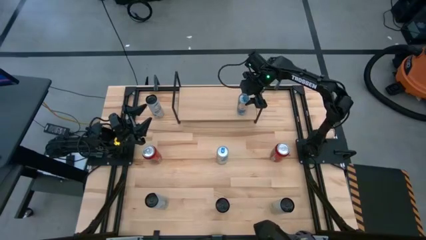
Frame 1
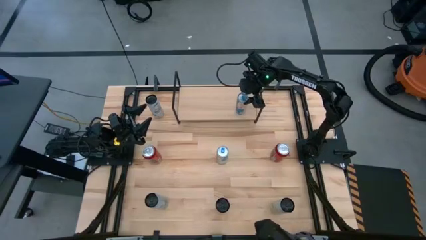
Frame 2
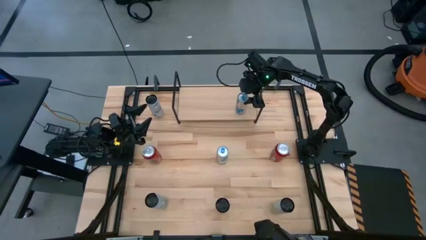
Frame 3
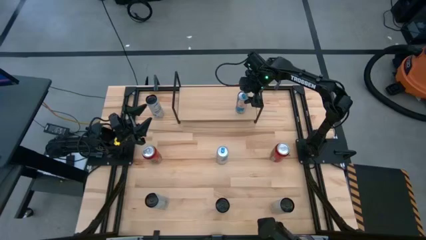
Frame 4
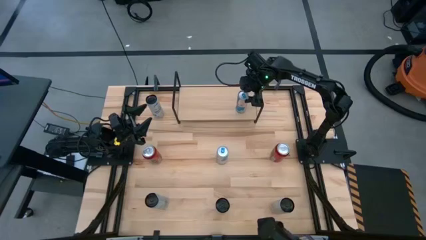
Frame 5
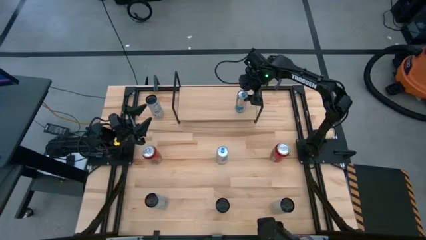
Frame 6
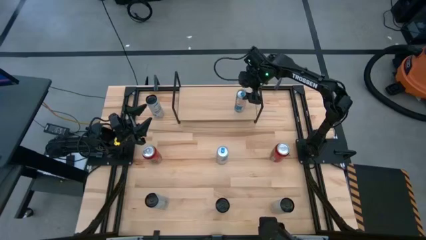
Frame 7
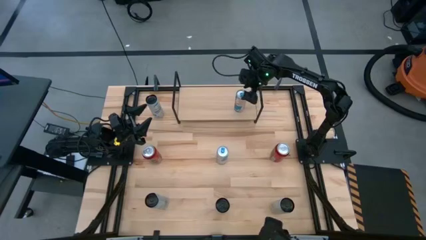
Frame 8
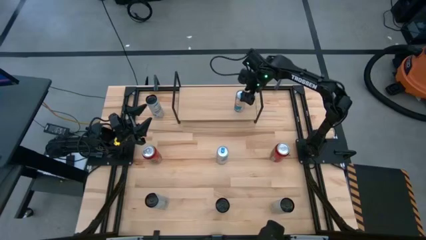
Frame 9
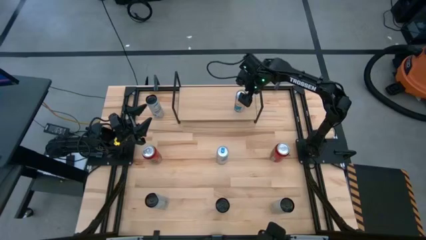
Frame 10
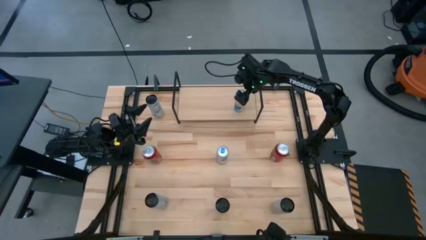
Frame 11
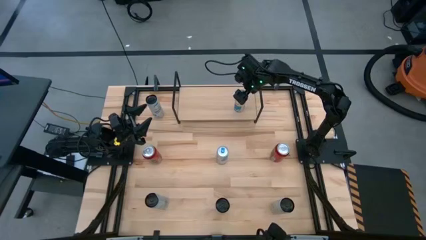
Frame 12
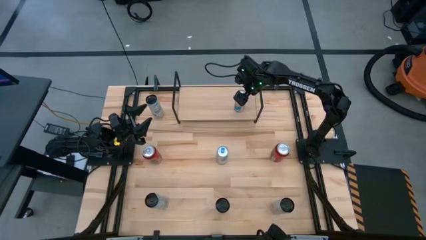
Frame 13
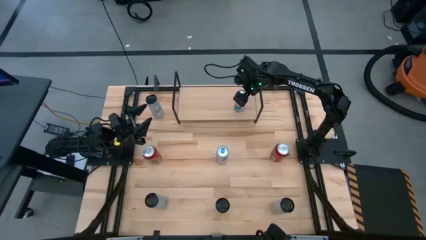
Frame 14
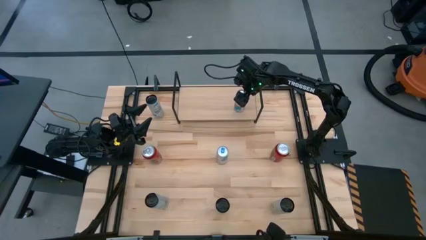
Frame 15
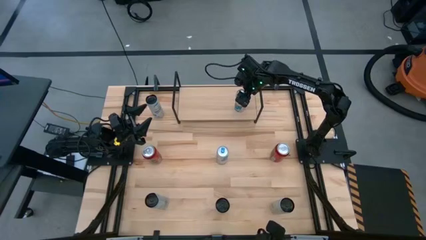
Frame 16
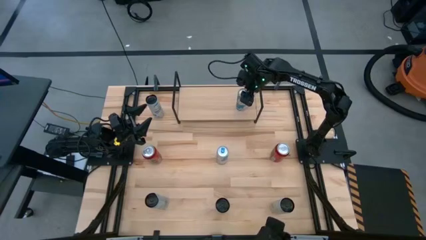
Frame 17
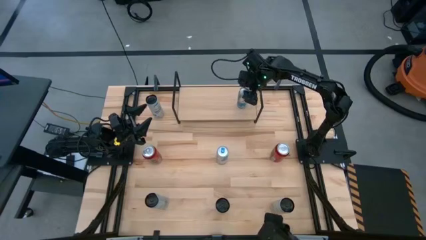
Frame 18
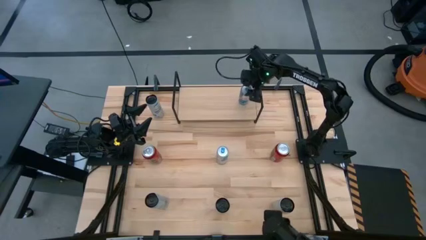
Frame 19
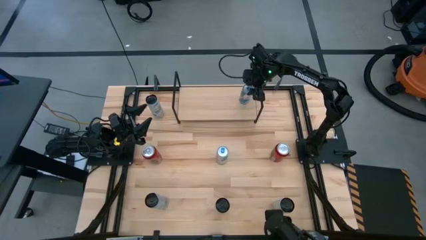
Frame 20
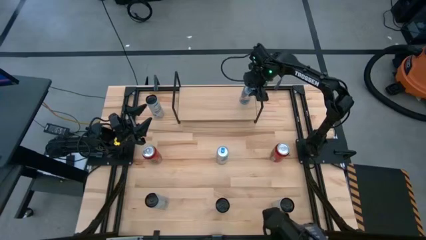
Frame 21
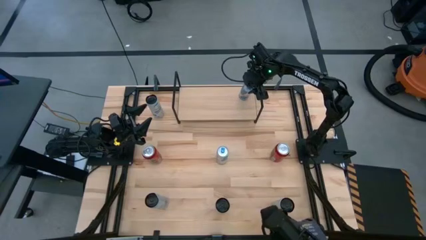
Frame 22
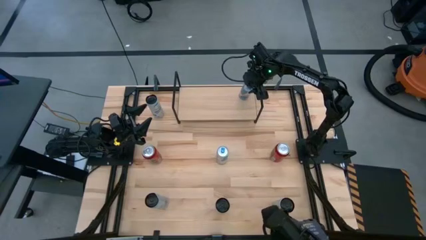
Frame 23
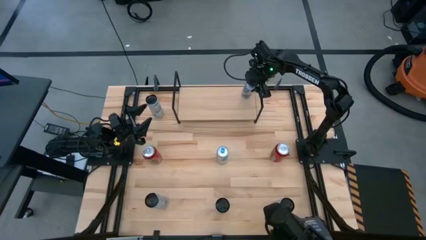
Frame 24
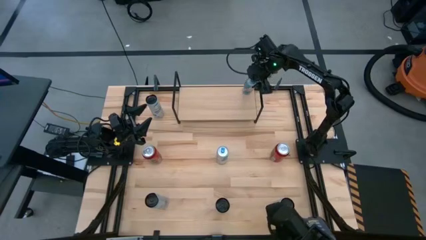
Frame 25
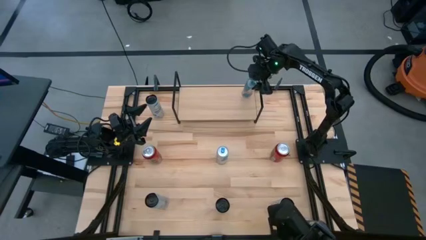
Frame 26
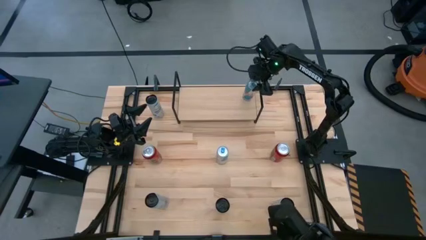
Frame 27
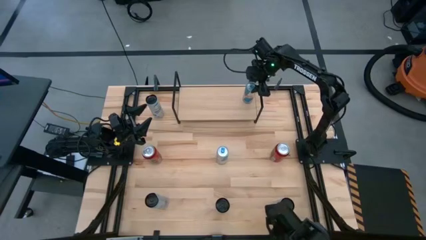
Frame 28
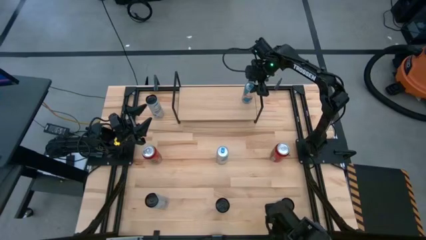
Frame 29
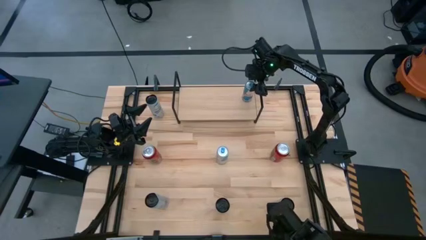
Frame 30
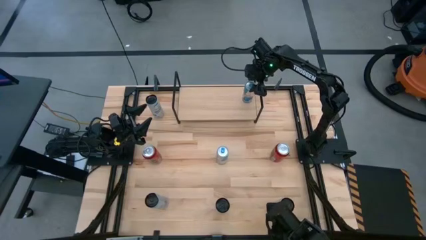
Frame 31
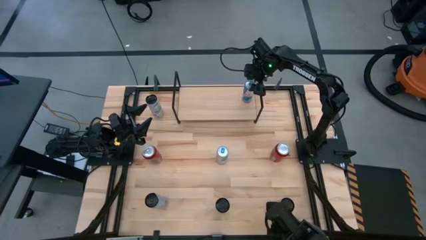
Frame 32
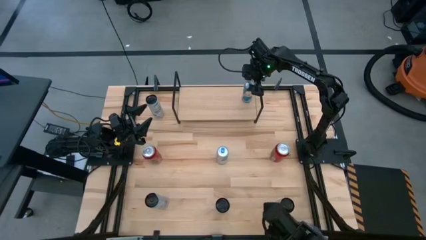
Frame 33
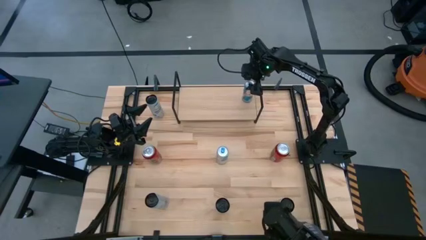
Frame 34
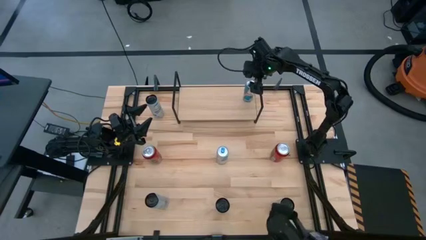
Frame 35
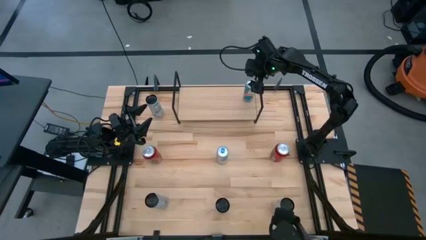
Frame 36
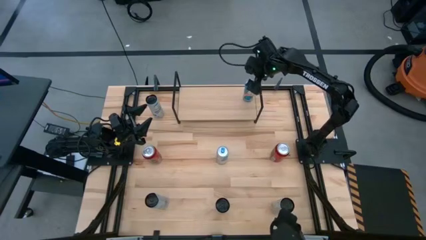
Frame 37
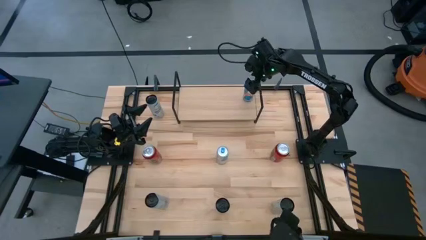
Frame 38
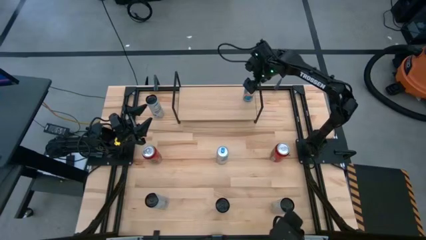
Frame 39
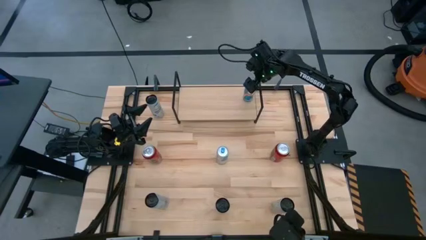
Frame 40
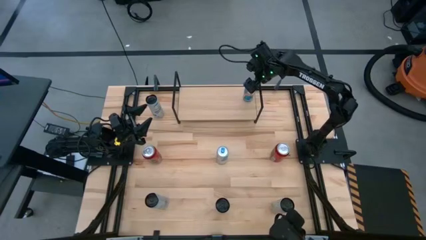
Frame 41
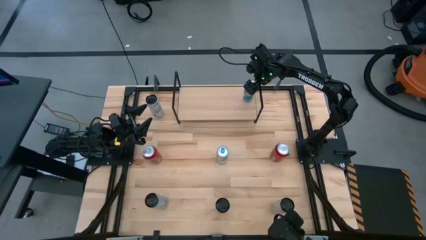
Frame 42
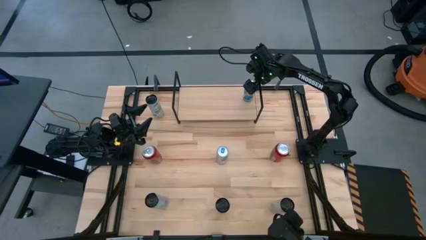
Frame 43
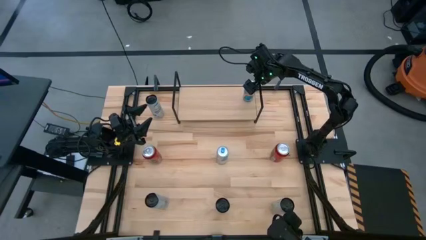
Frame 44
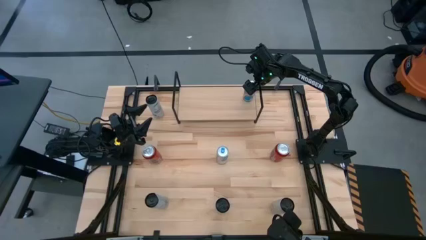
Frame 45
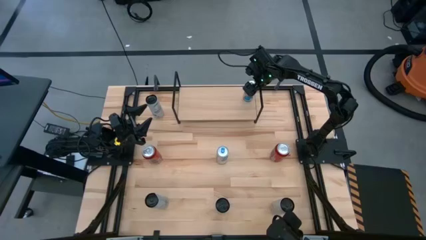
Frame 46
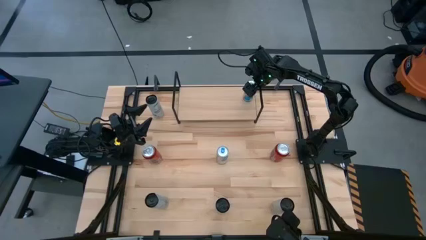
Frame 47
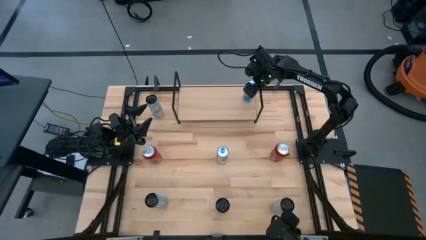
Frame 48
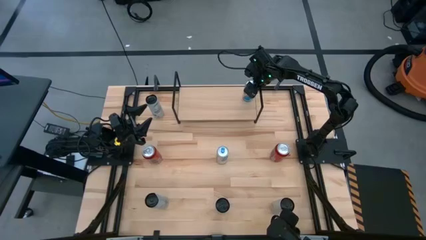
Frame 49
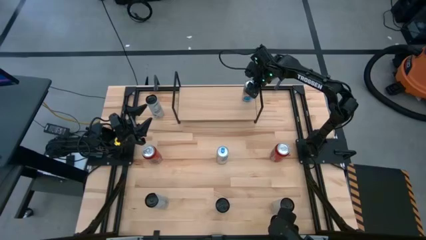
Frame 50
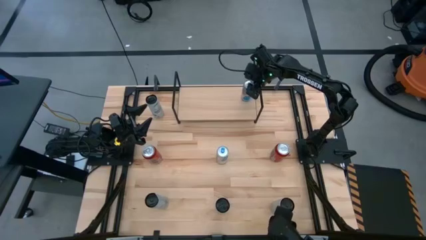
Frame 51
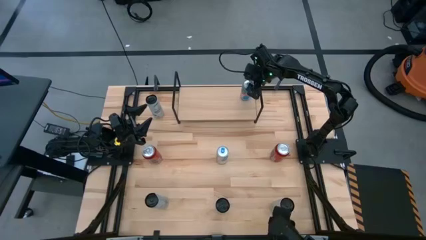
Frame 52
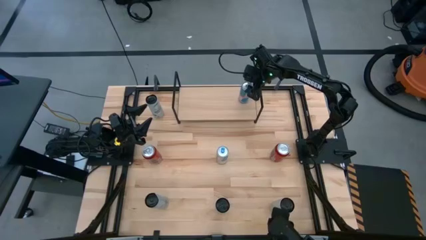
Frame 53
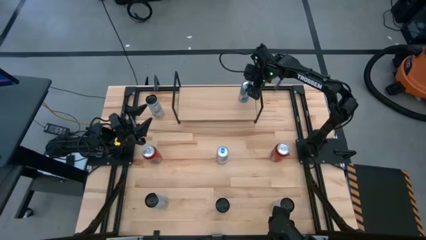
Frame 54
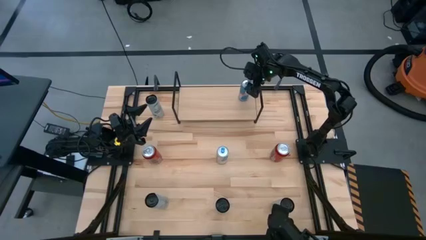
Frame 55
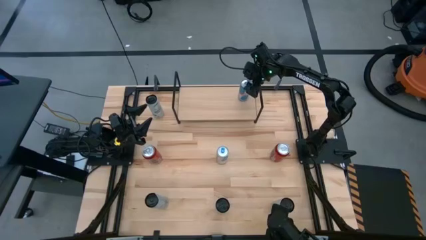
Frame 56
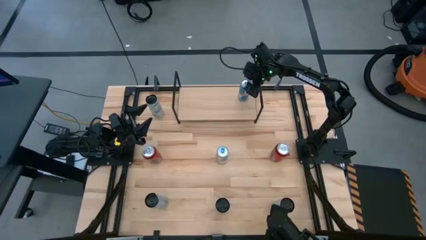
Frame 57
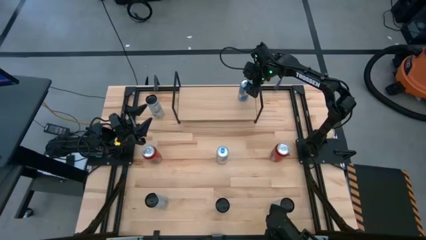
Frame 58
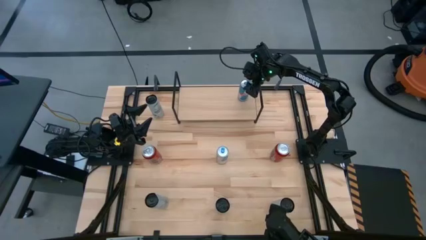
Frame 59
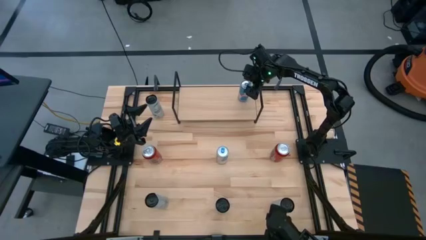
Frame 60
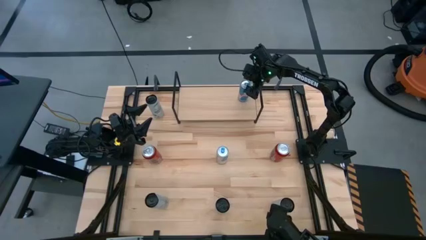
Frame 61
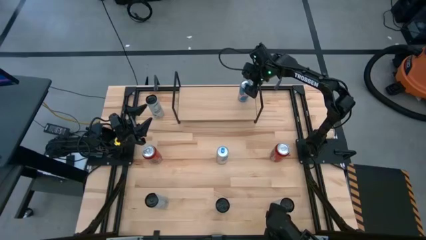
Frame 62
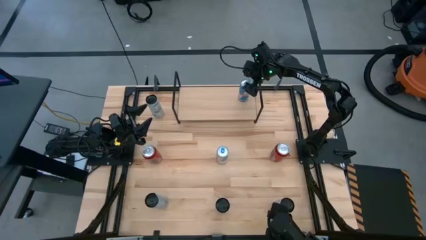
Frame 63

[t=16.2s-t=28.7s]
Task: Place canned beverage on shelf
Put the top blue soda can on the shelf

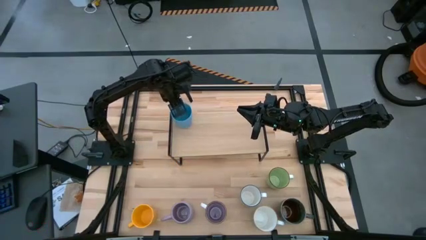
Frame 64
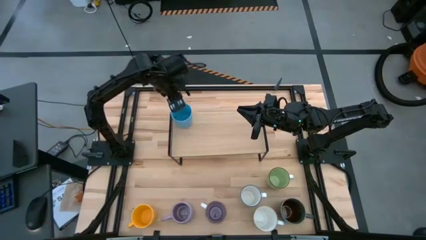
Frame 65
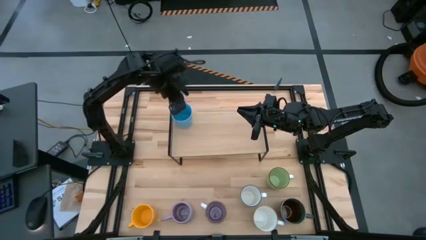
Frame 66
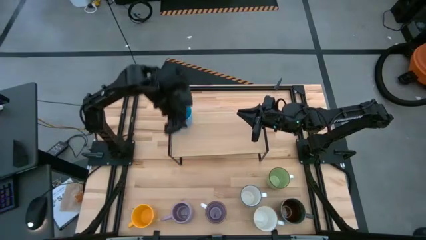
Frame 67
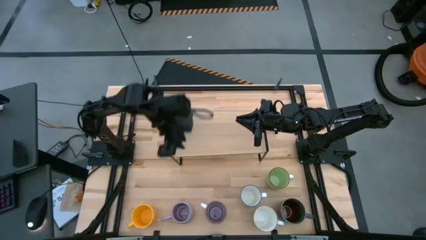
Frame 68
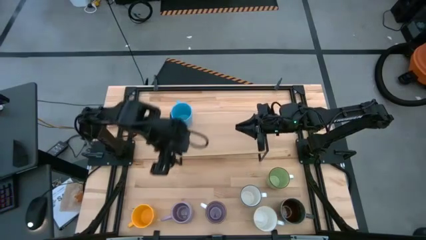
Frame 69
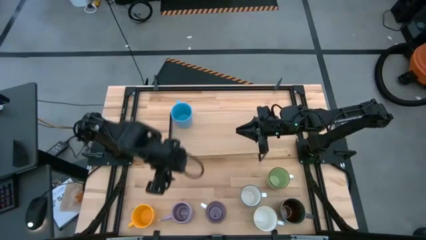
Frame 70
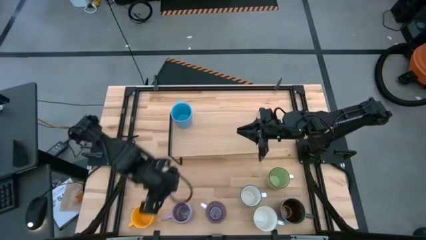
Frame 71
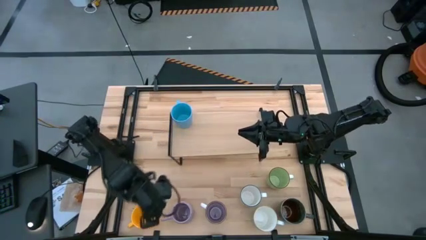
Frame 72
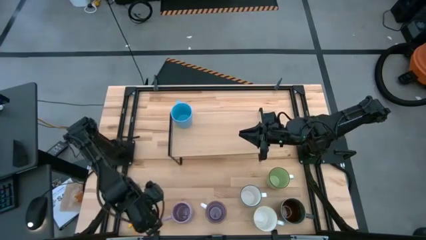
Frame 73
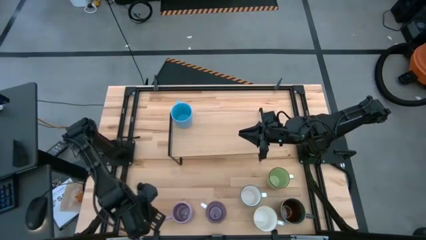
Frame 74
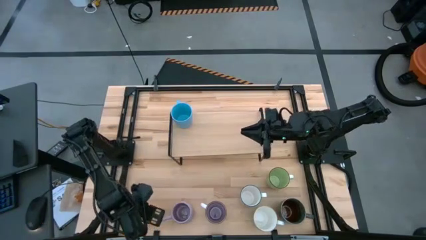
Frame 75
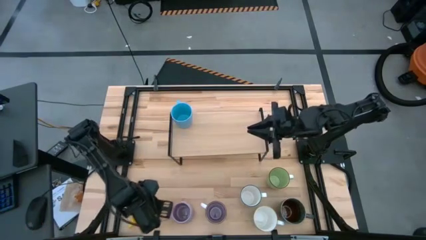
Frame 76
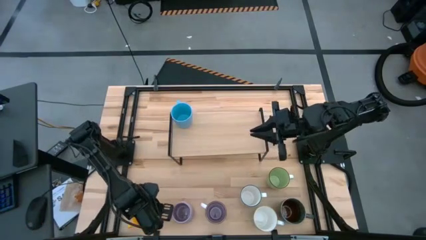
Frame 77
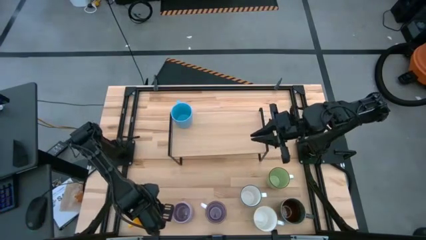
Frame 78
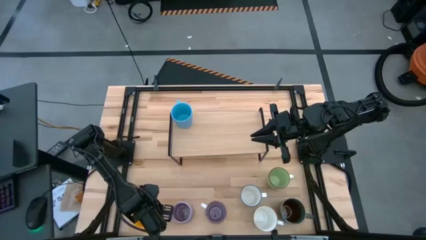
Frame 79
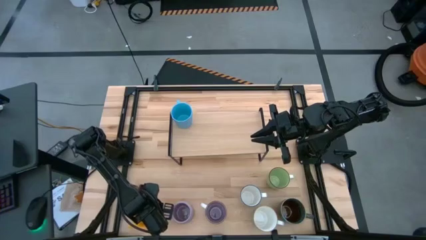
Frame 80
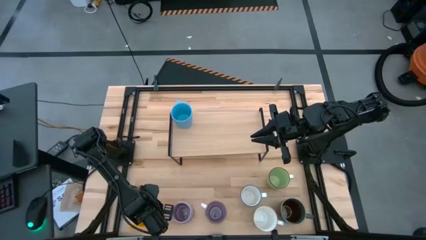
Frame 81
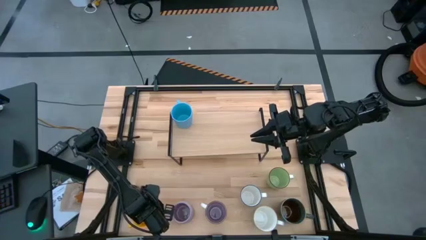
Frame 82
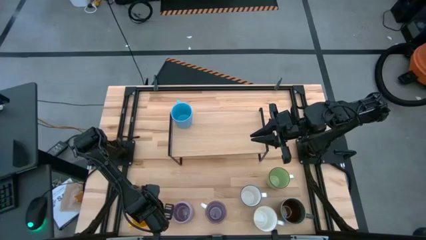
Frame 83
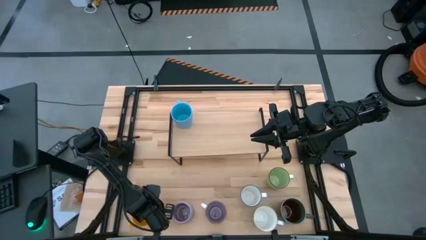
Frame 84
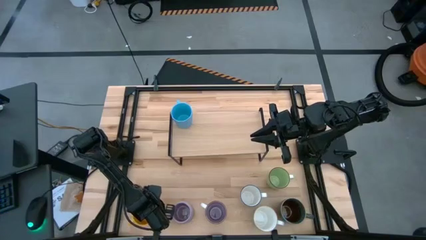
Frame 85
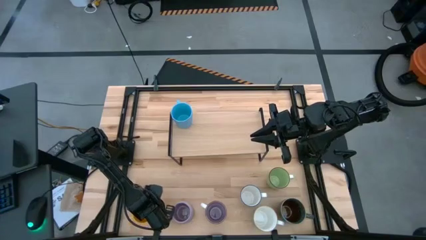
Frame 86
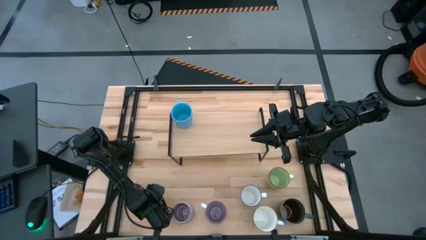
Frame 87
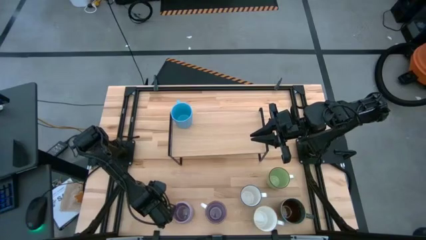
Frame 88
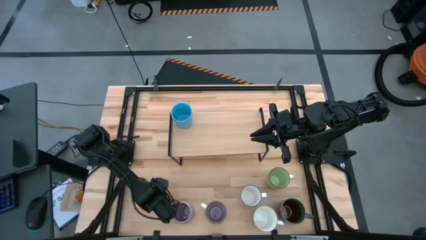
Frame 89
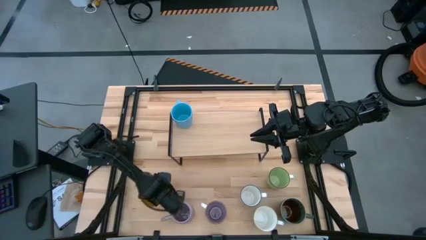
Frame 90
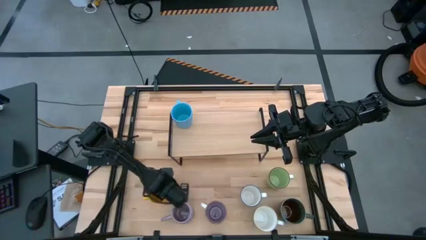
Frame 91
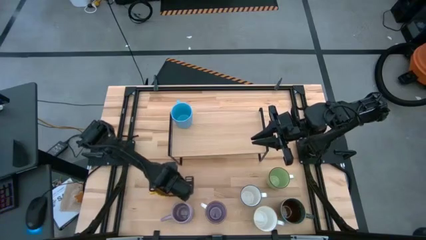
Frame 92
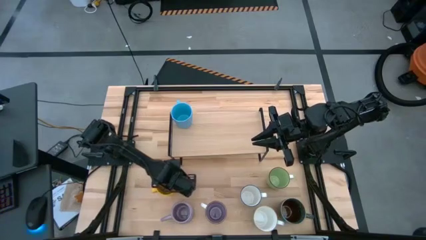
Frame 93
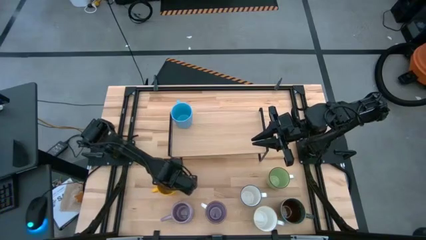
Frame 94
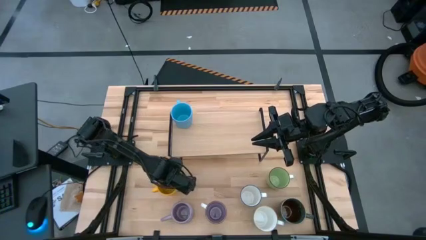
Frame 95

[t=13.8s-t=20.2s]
Task: Place coffee mugs
Move the yellow mug to the top
